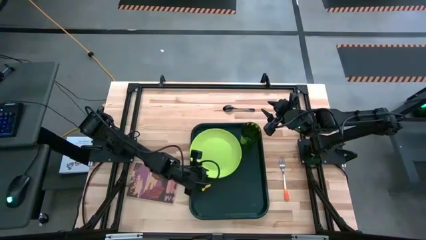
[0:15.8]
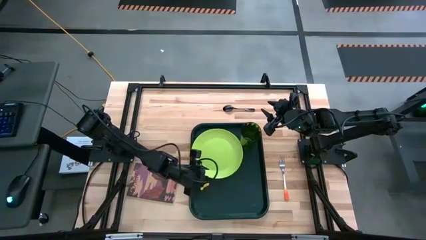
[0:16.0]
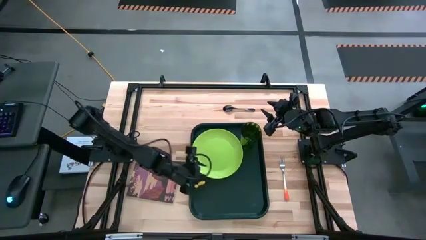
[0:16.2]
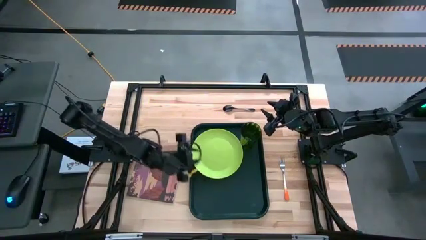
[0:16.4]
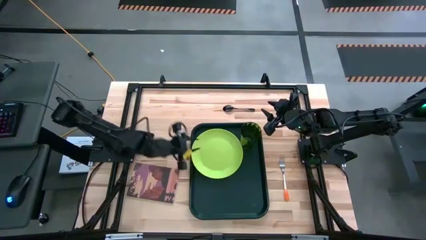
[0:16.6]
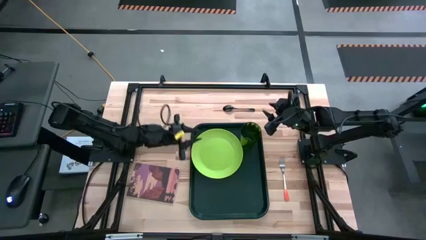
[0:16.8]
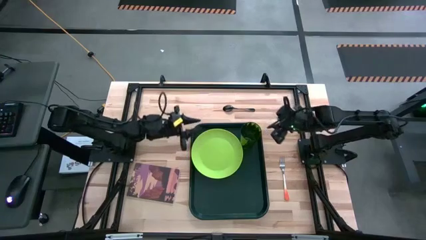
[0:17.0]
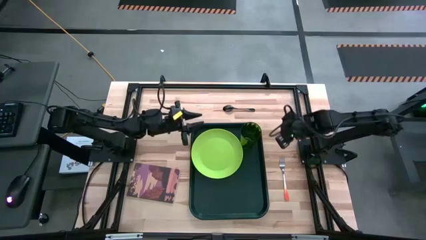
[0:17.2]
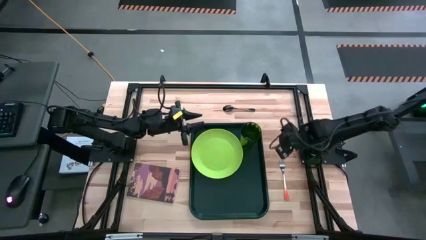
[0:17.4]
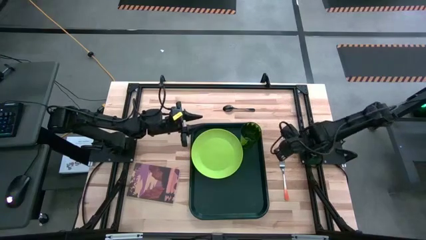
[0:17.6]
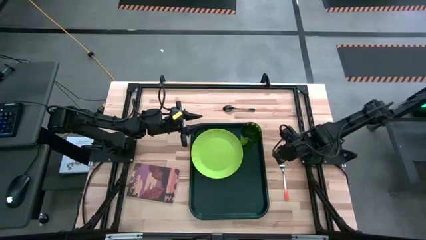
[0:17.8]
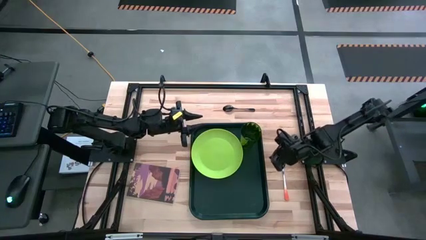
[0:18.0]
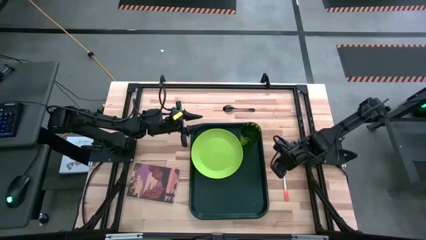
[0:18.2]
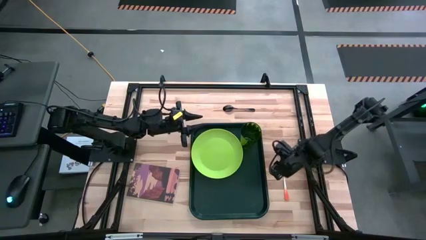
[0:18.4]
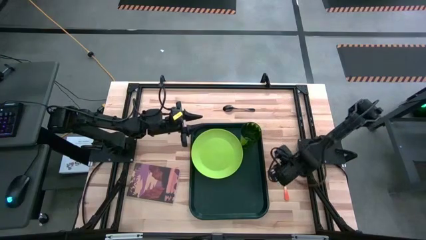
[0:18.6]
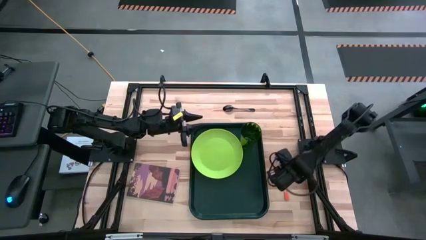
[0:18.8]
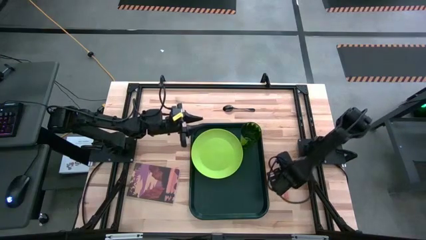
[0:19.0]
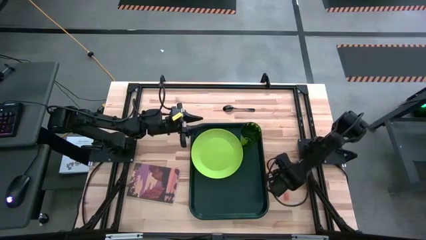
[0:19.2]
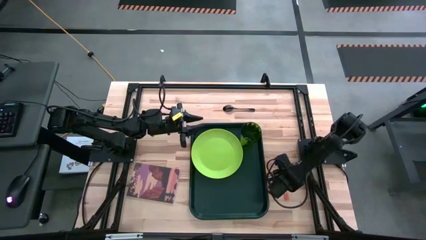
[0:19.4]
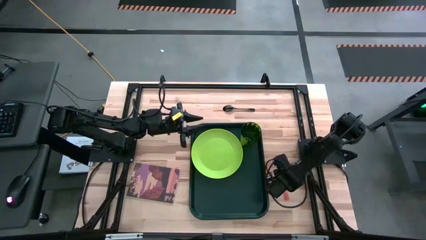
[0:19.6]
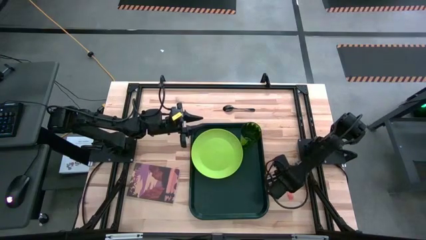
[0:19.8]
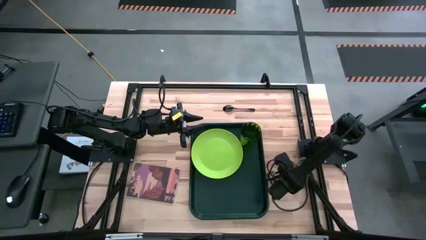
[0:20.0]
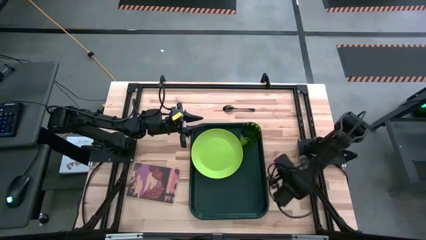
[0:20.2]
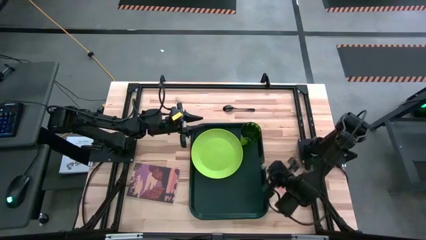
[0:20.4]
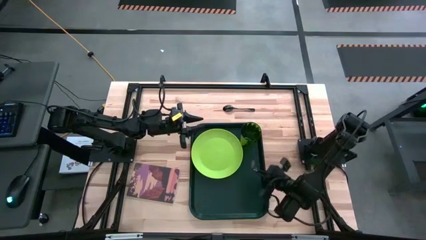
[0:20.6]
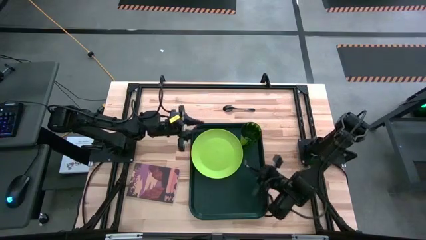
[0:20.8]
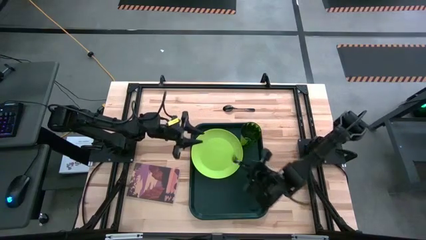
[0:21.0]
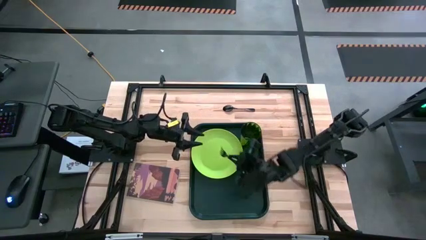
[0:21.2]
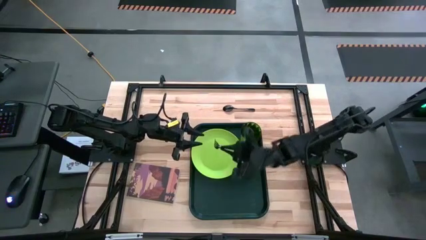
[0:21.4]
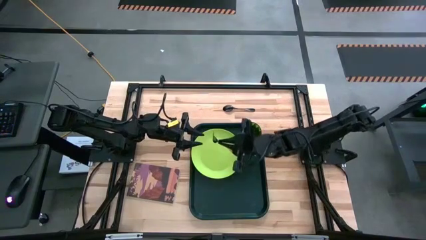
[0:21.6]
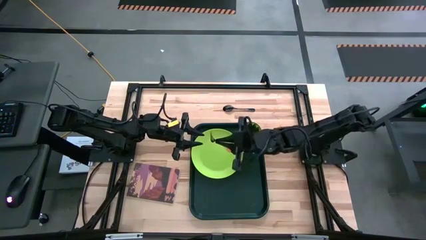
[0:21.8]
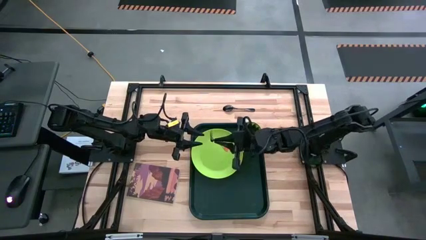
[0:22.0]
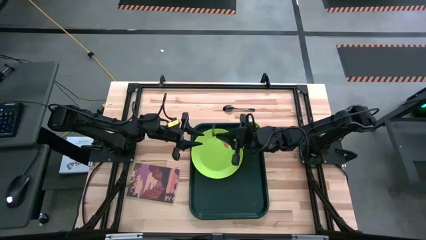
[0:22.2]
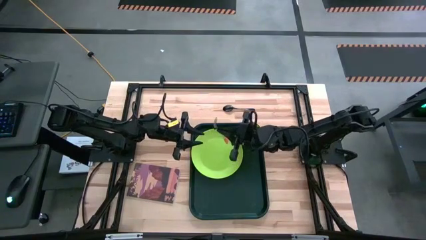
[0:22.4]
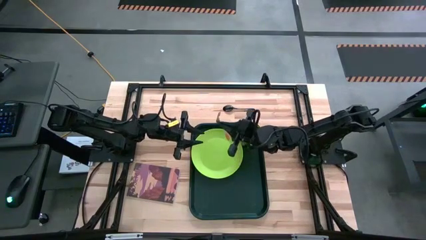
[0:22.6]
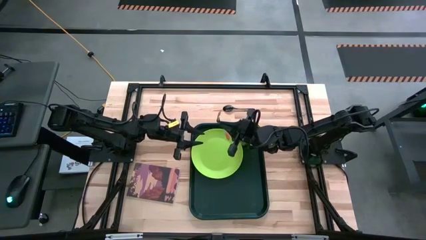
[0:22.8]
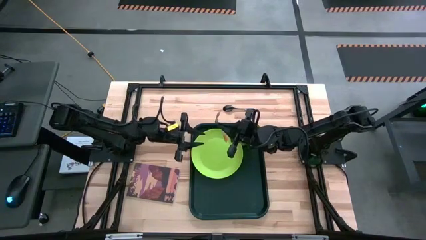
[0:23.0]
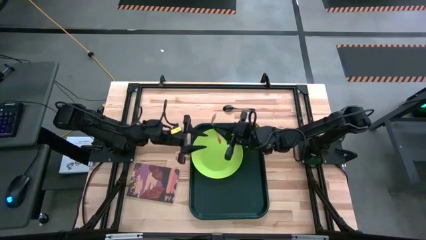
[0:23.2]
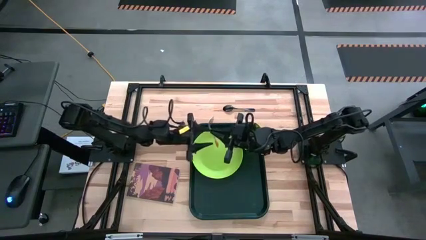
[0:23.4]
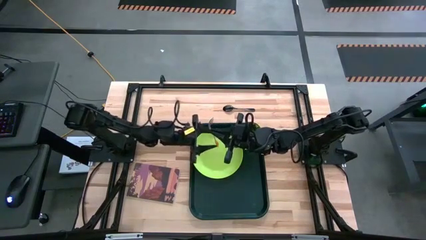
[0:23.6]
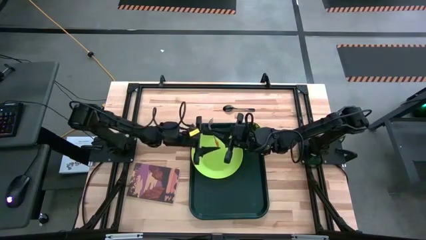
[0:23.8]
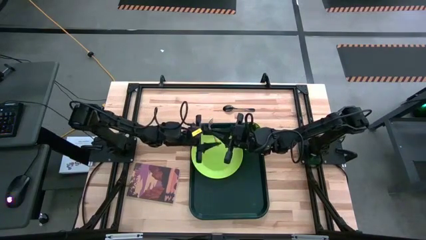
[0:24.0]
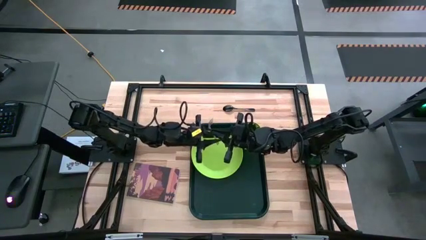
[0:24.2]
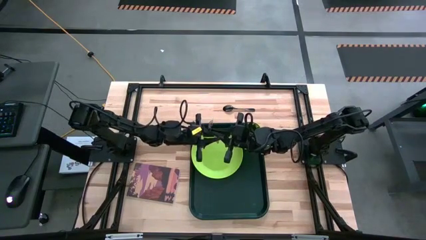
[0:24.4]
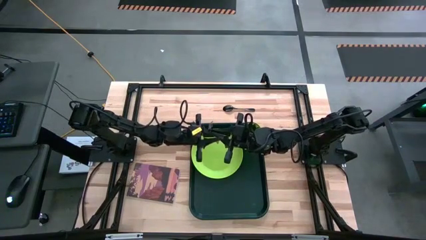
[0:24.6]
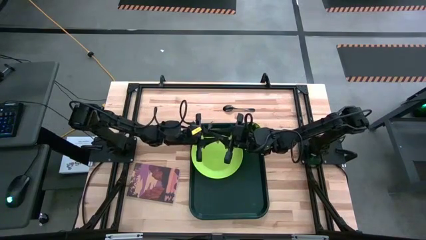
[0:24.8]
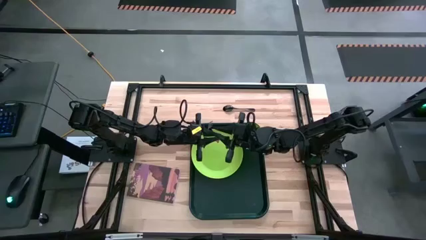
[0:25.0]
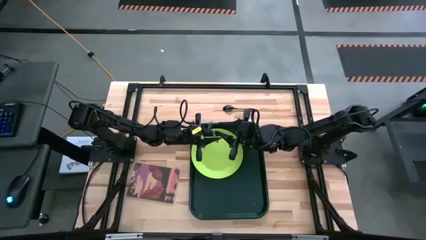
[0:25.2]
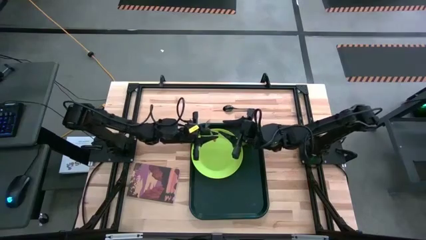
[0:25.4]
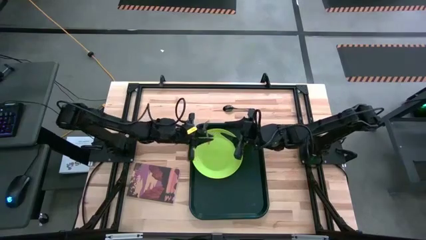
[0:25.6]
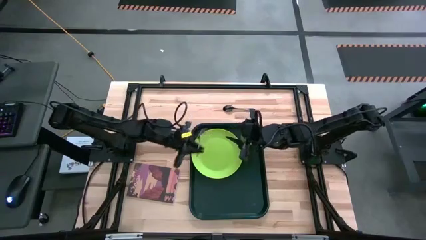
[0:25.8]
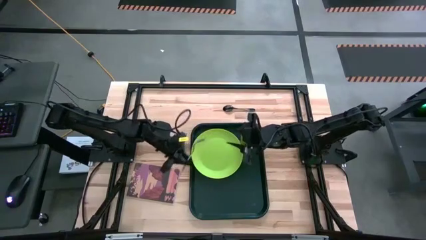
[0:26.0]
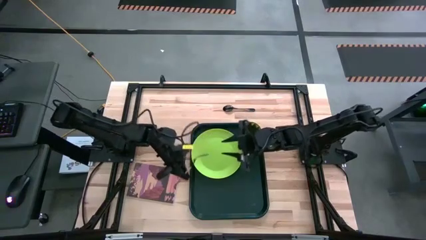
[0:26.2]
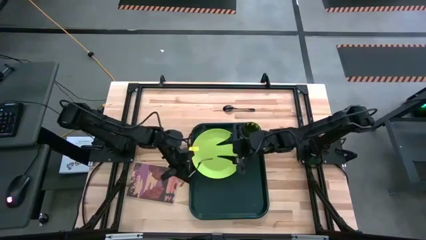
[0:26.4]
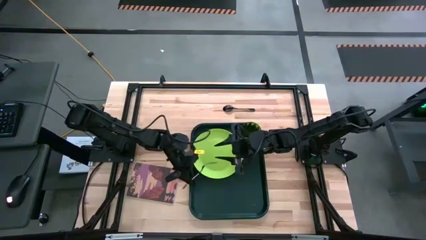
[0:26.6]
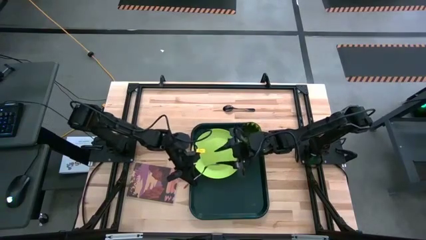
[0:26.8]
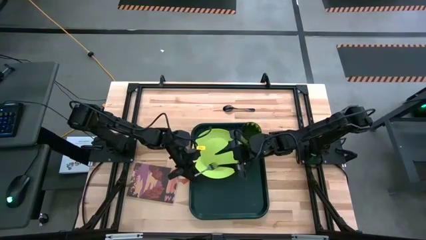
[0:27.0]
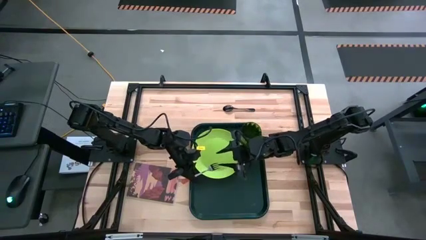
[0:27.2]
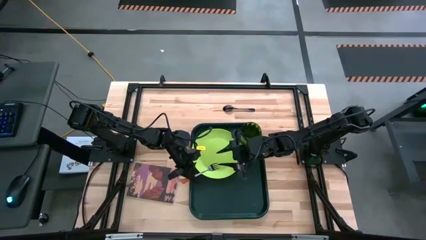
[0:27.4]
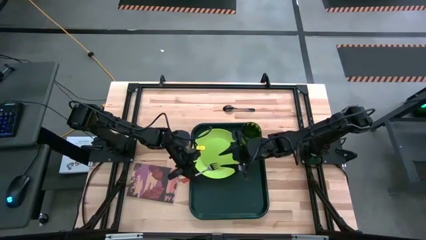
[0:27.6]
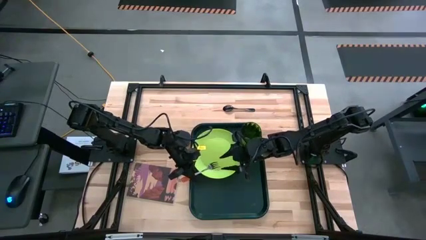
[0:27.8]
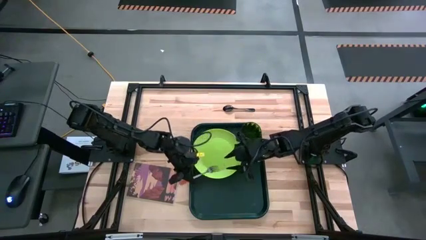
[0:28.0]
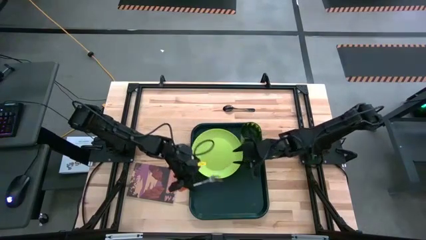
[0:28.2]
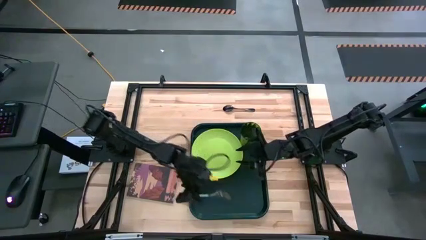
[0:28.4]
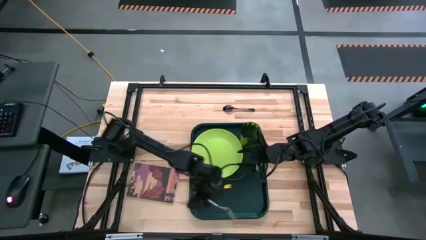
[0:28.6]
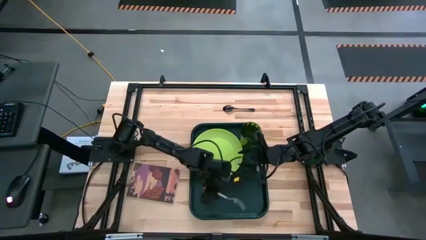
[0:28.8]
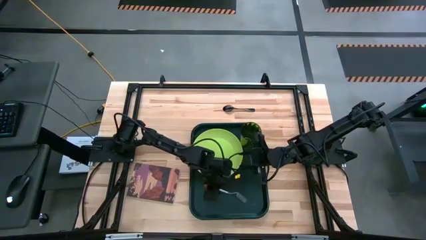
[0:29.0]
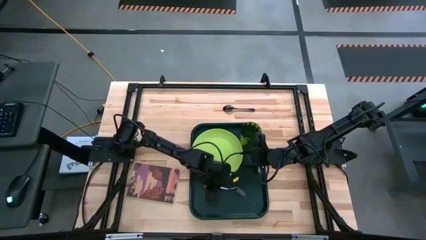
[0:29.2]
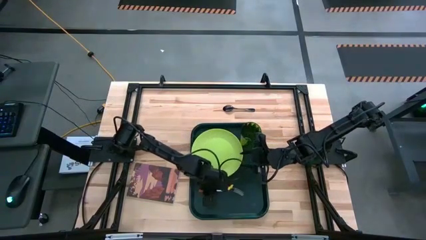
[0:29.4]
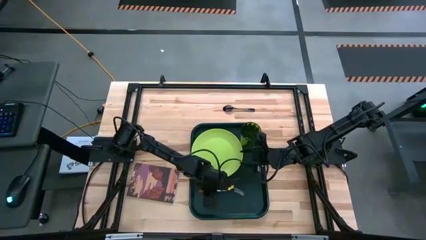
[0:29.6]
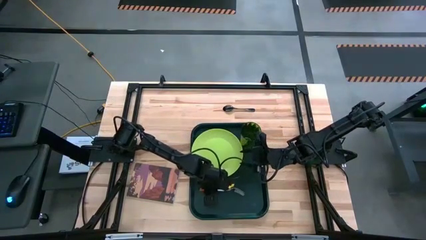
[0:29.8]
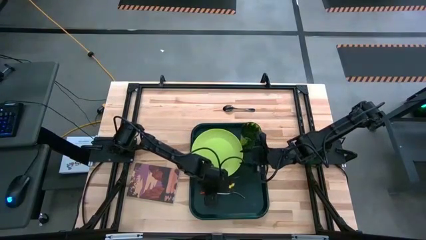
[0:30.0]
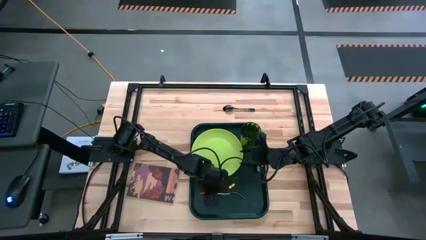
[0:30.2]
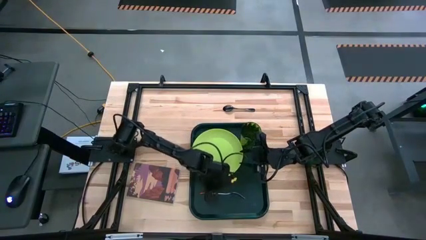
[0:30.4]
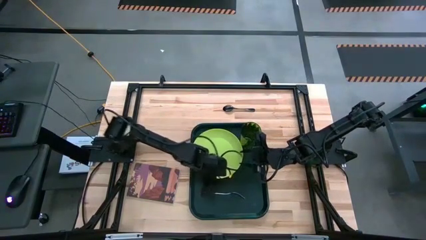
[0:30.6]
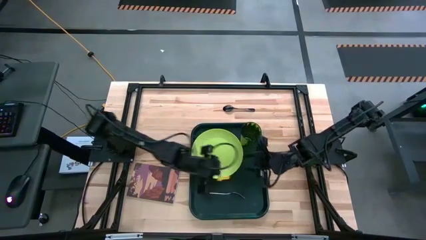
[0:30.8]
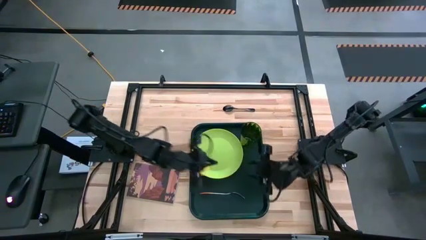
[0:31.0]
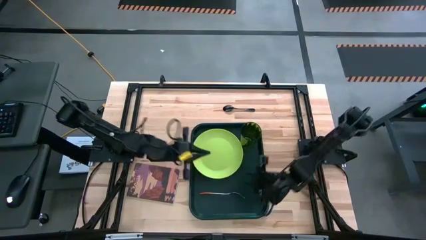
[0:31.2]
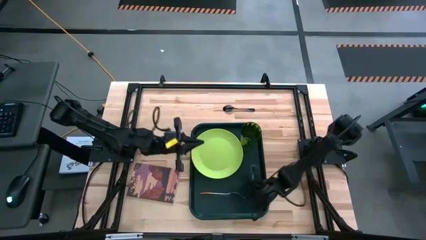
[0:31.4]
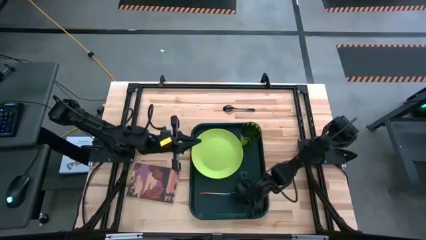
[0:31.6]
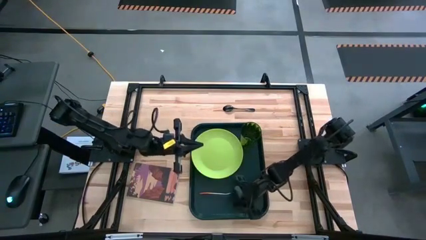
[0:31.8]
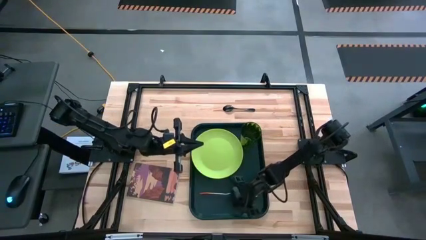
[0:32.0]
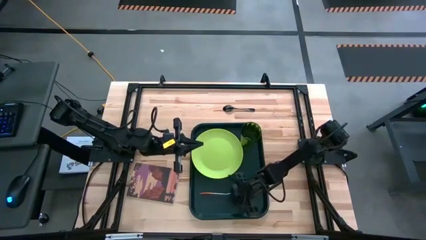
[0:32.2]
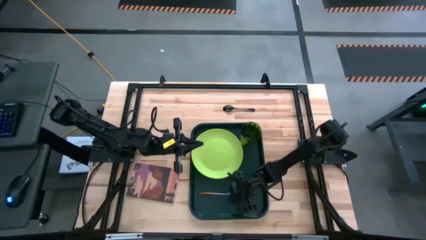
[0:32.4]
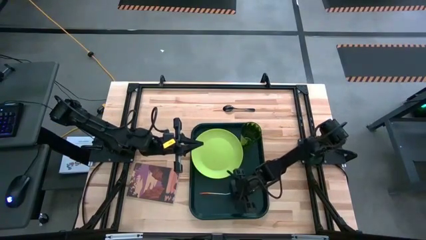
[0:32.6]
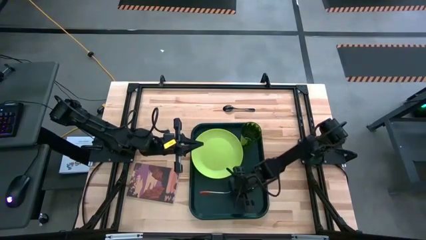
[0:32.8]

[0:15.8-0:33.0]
Task: Pick and place plate/cup/fork/spoon on tray
Put the orange fork on the black serving tray to the right of the green plate
